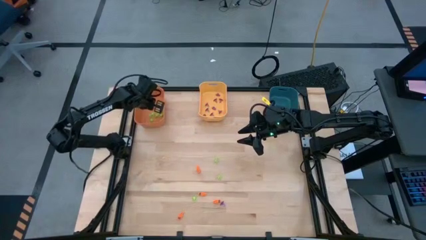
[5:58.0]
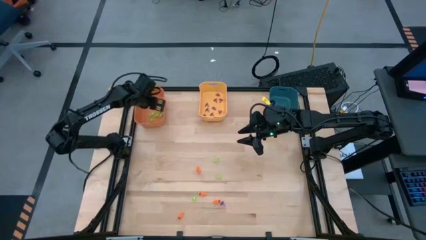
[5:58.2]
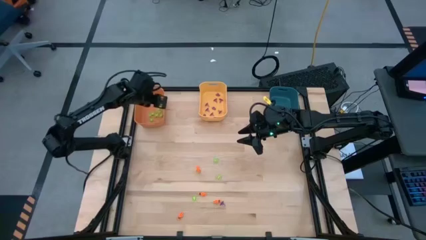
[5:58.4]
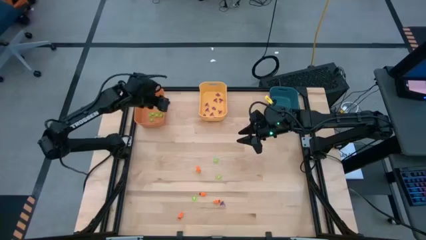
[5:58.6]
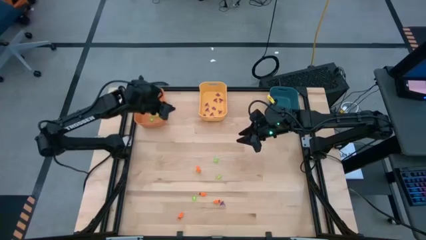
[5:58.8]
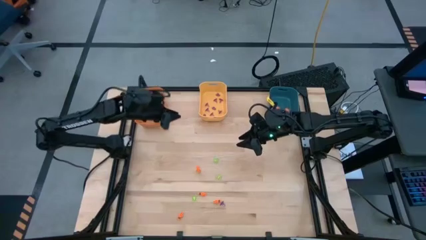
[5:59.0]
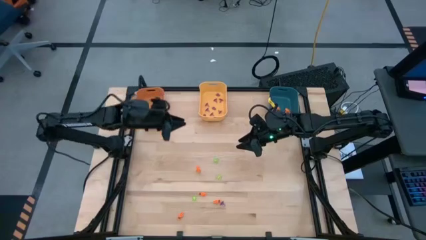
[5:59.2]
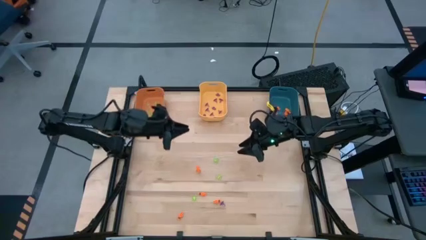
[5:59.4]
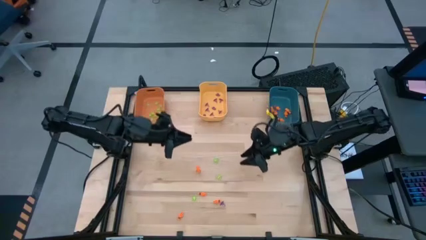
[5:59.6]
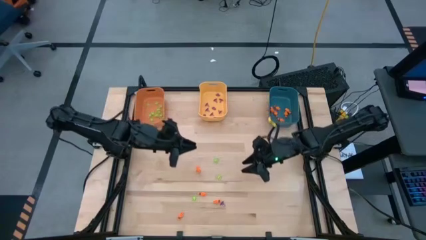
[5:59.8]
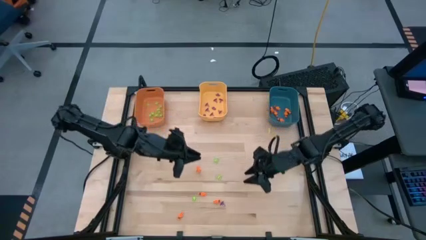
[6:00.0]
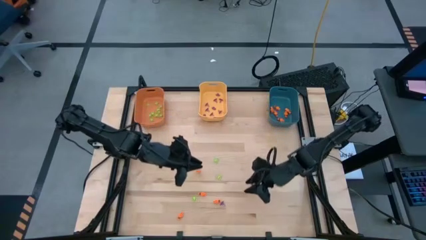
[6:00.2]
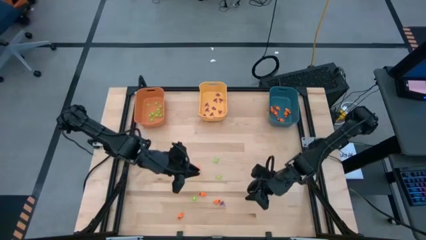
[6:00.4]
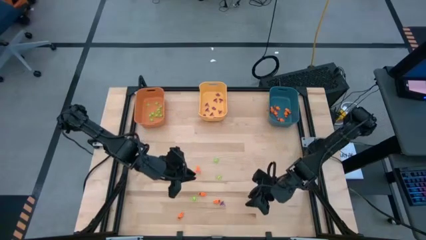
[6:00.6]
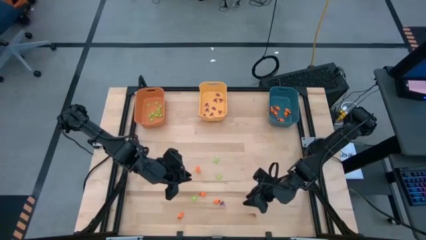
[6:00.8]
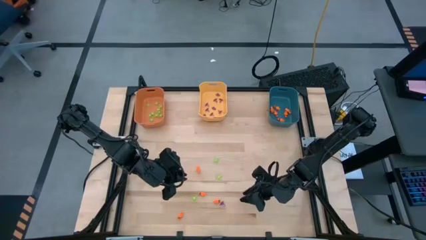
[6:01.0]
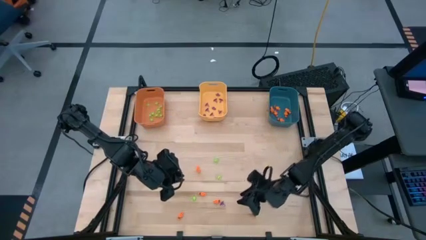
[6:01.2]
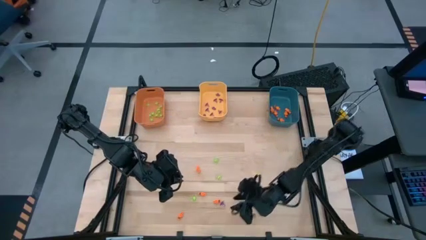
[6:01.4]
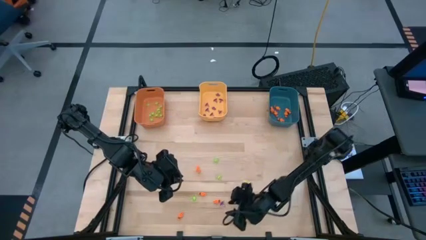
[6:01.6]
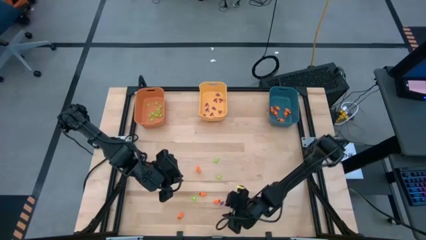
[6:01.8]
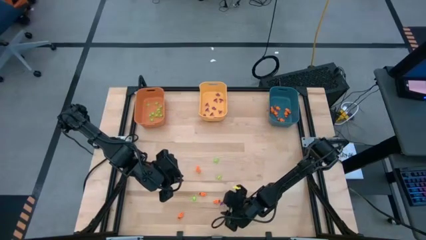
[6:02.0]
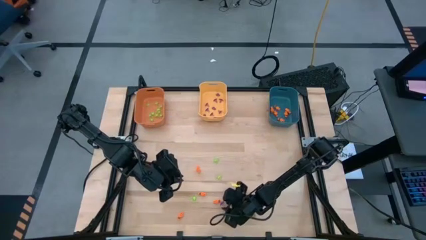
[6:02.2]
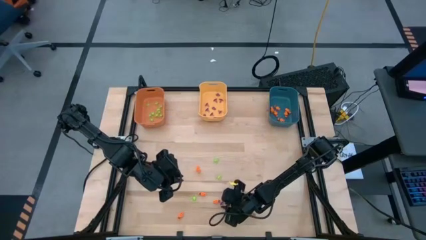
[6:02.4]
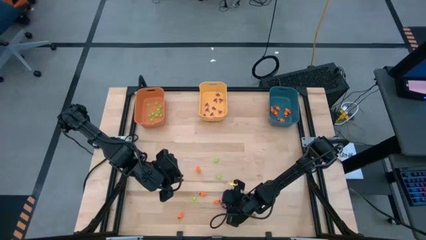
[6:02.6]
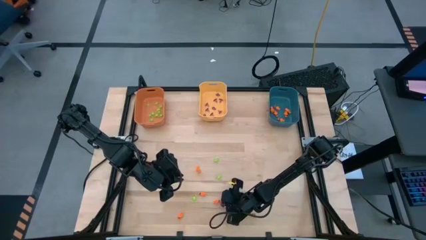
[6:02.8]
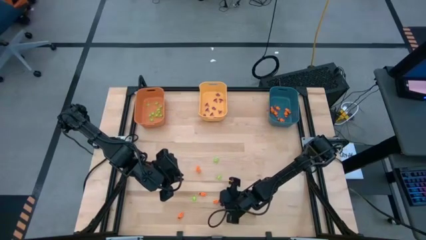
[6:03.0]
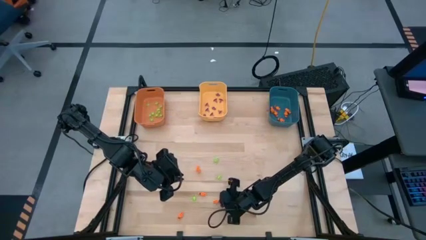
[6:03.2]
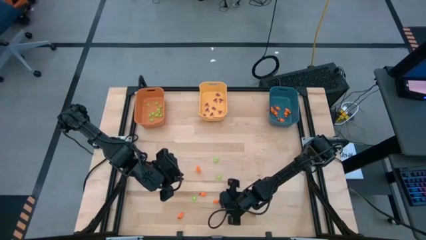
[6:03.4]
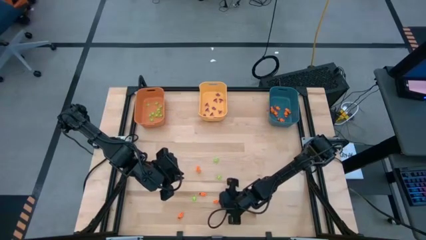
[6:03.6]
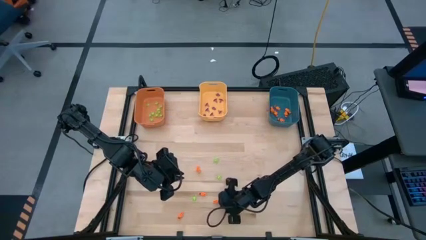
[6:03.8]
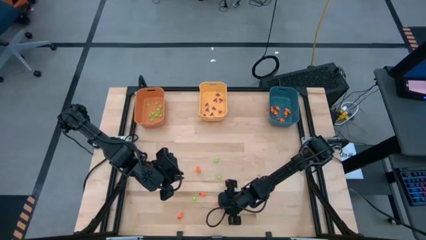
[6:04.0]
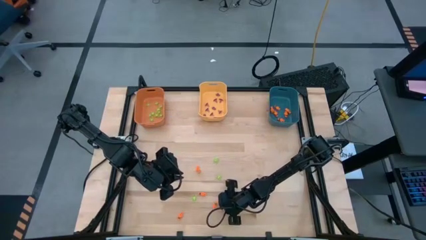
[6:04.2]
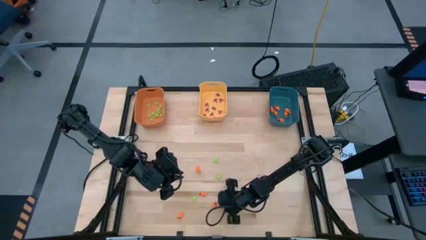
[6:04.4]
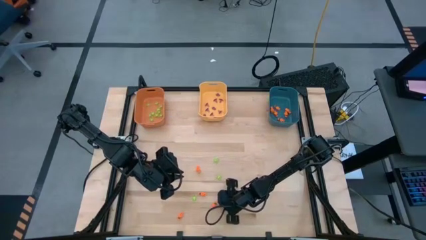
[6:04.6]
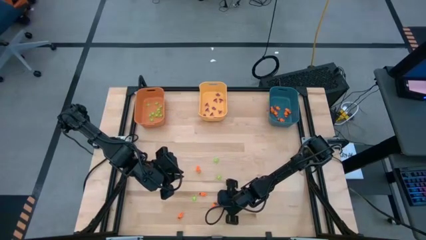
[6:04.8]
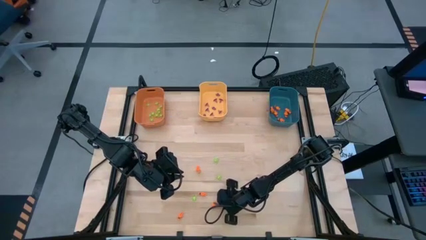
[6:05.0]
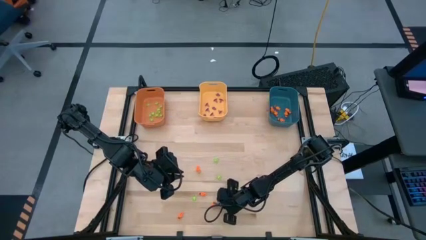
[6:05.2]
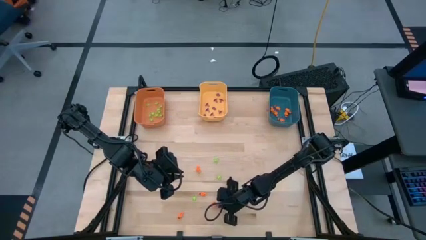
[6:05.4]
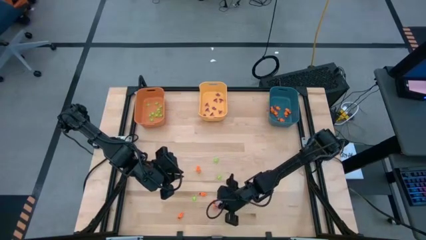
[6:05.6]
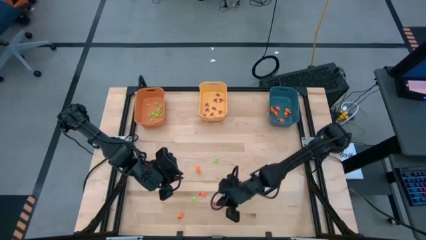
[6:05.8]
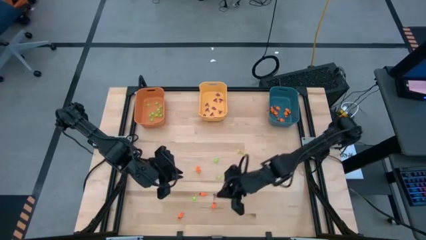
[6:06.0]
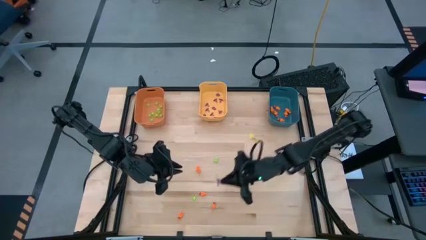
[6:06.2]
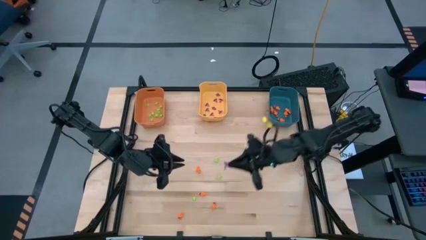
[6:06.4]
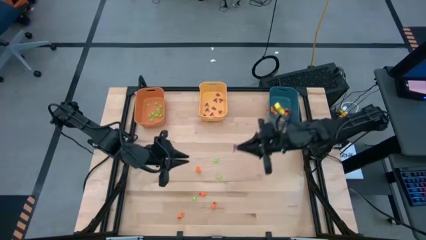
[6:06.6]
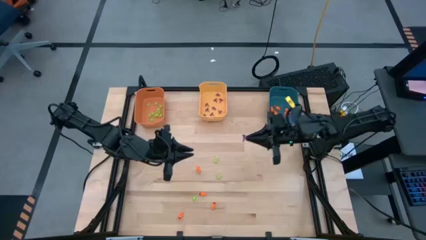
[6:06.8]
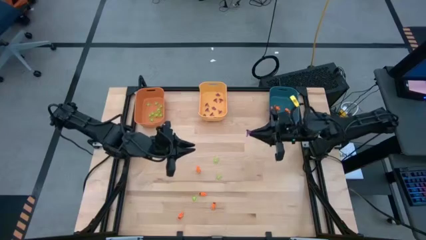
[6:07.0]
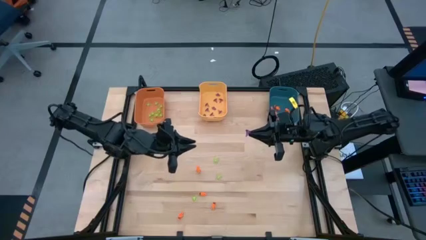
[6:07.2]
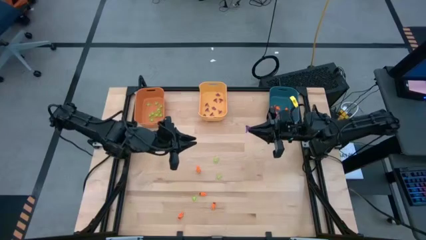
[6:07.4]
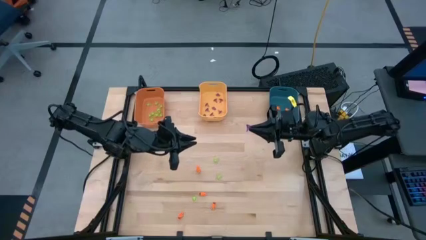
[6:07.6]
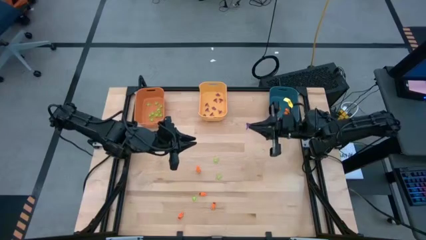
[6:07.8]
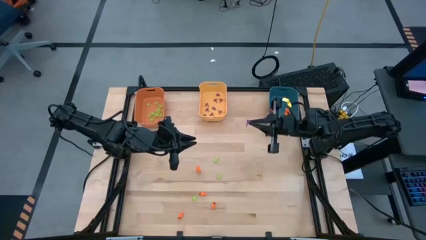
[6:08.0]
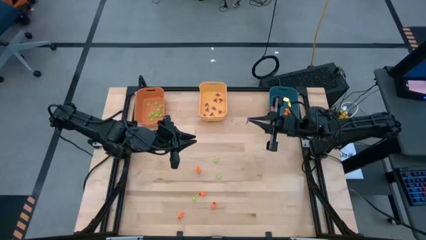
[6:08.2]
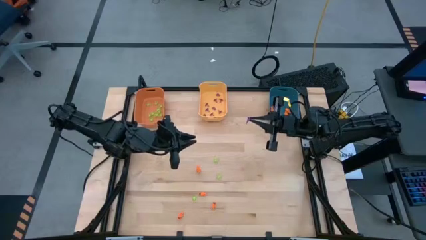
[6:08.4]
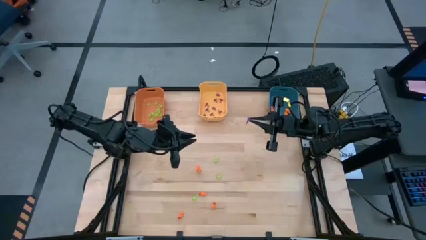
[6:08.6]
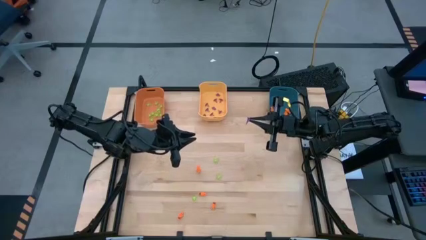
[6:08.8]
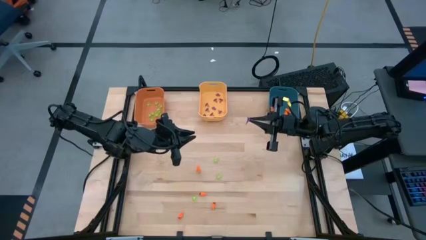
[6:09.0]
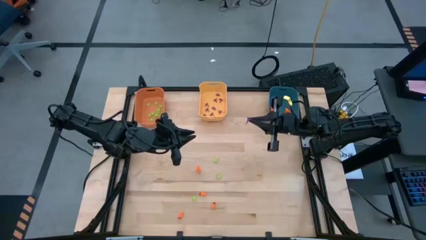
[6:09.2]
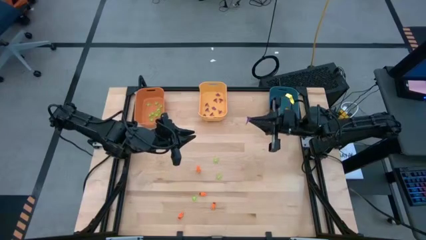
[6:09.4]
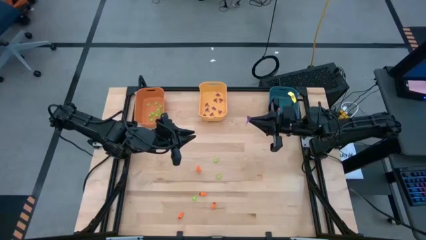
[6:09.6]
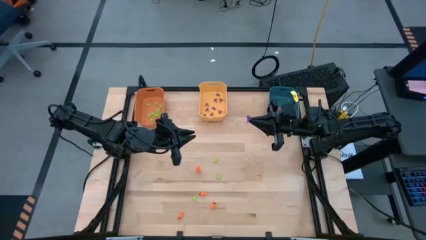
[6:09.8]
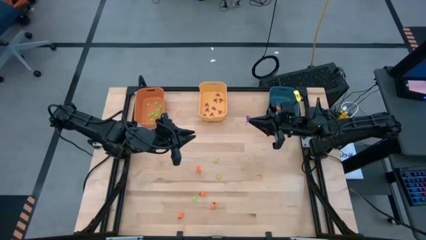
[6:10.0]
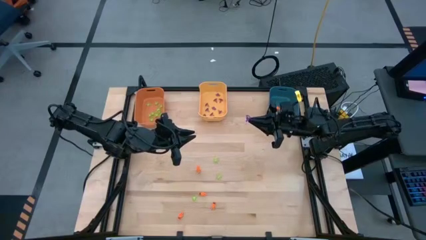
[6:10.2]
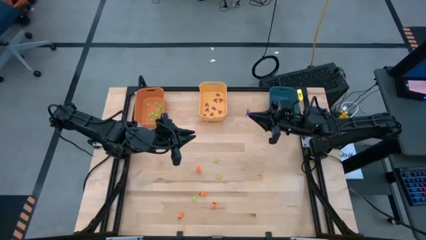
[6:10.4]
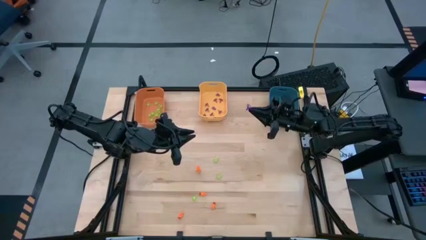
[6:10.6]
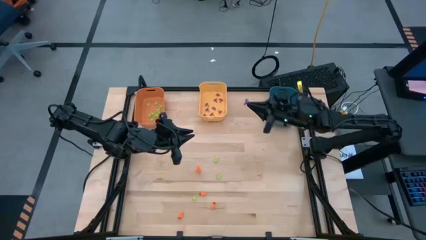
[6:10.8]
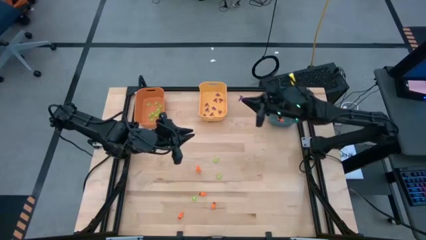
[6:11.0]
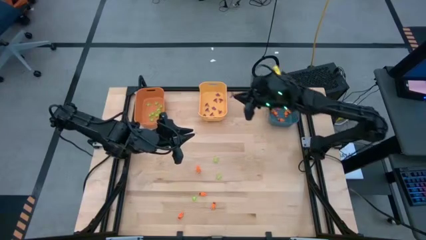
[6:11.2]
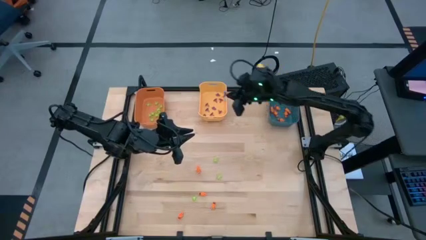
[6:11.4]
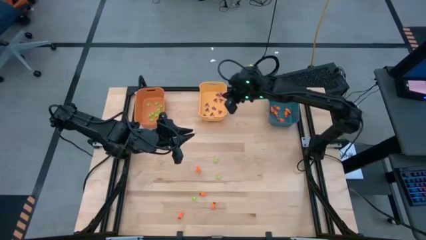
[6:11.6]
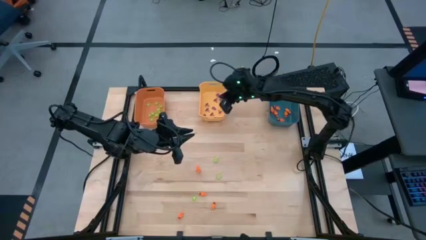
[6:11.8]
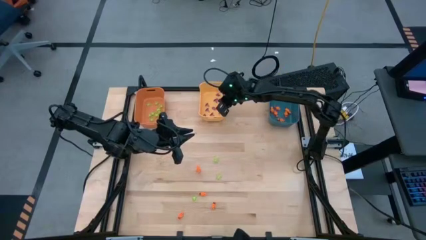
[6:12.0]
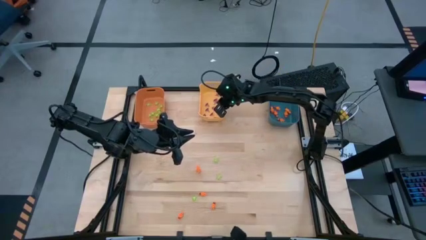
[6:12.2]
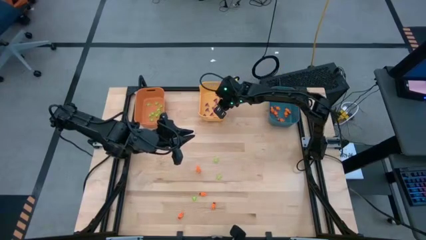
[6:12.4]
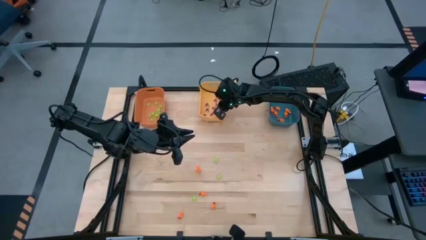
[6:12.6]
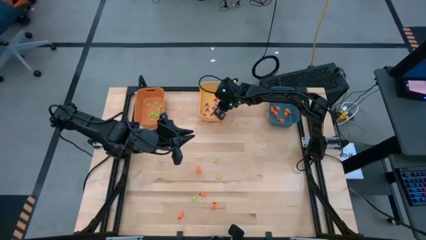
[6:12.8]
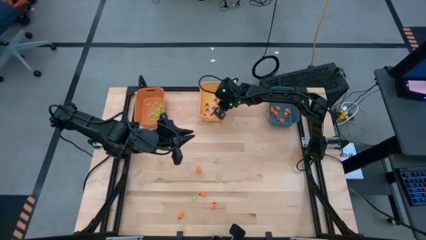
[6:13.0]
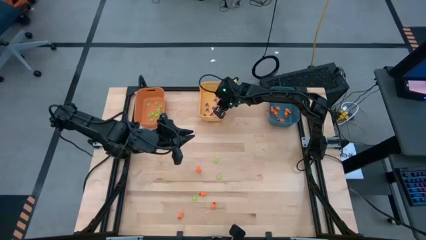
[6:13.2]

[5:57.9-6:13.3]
Task: Sort Halloween decoration
Put the purple witch hat toy into the yellow bin

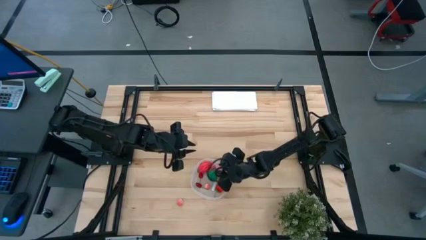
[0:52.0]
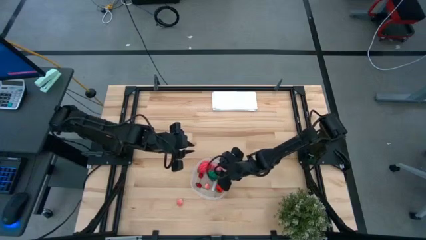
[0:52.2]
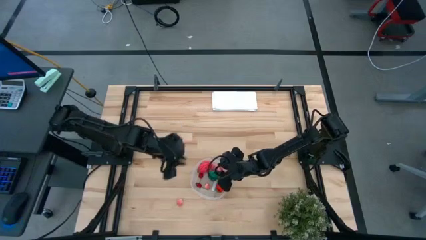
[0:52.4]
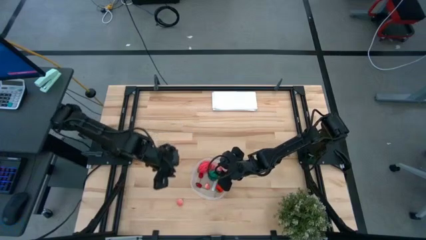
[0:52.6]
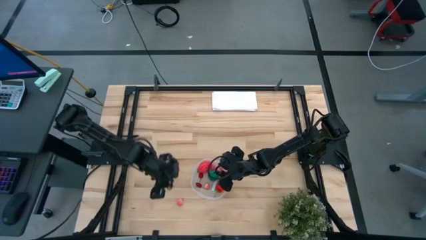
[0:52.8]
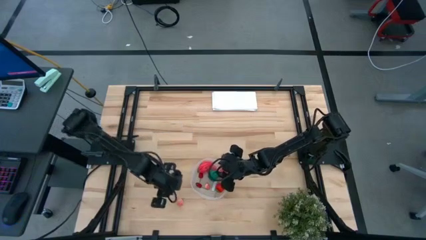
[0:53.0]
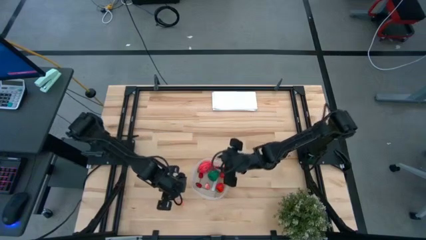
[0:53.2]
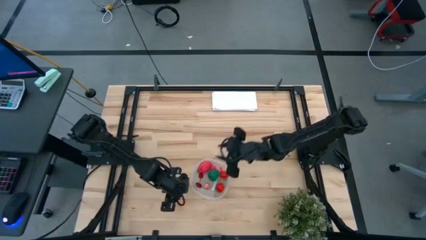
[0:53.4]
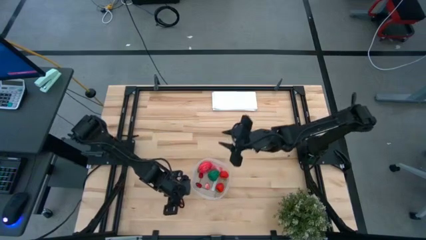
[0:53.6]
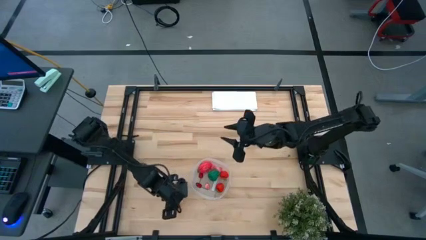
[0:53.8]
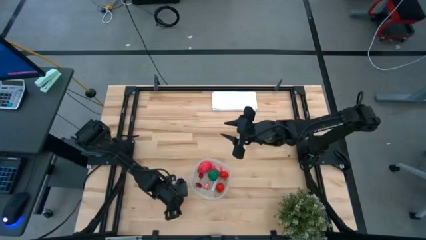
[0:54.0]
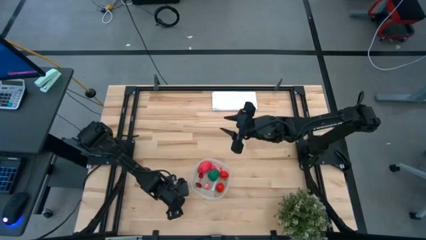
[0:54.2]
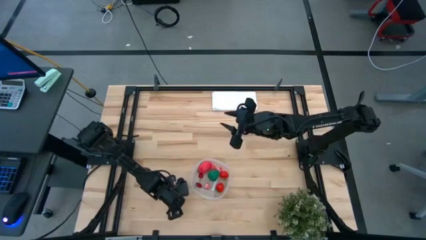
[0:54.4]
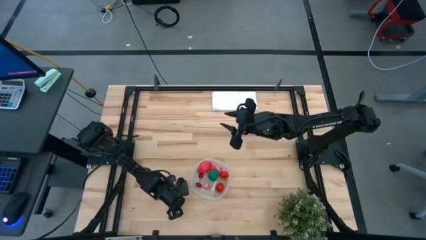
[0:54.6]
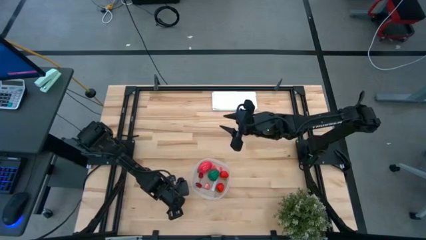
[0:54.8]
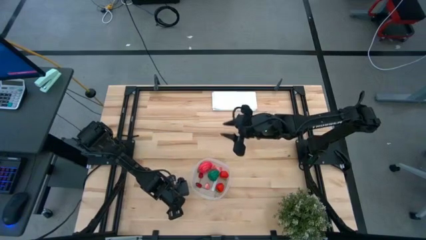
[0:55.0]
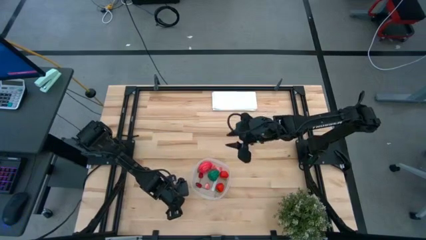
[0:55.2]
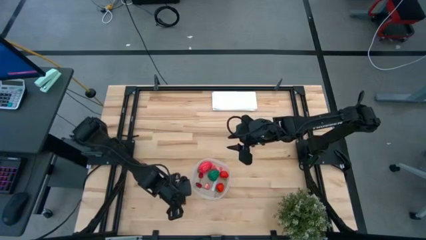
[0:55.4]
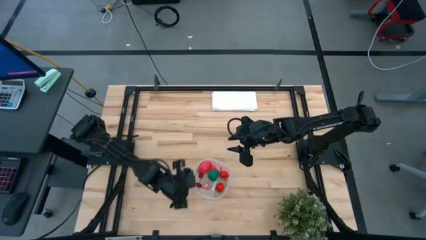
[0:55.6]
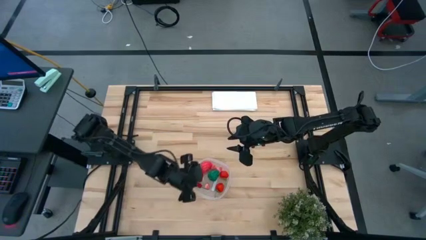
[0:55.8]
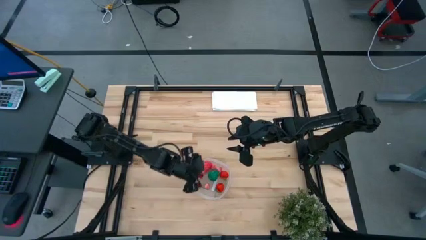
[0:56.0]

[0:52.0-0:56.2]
Task: Pick and placing Produce into tupperware
Put the pink peach into the transparent bin
